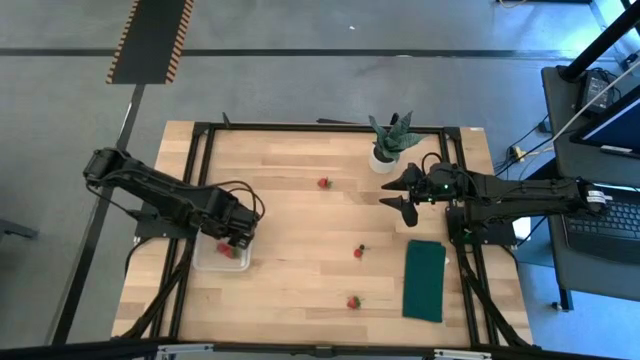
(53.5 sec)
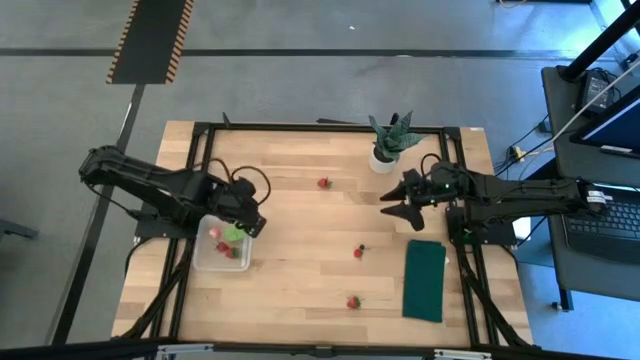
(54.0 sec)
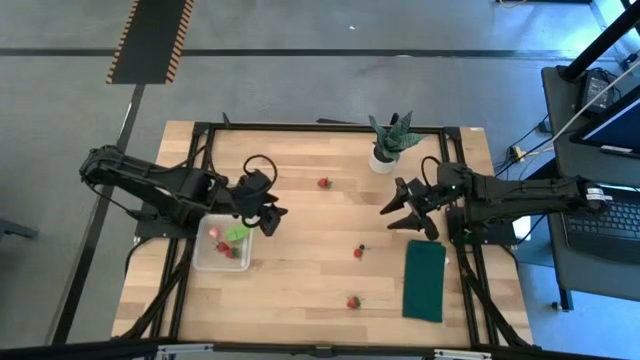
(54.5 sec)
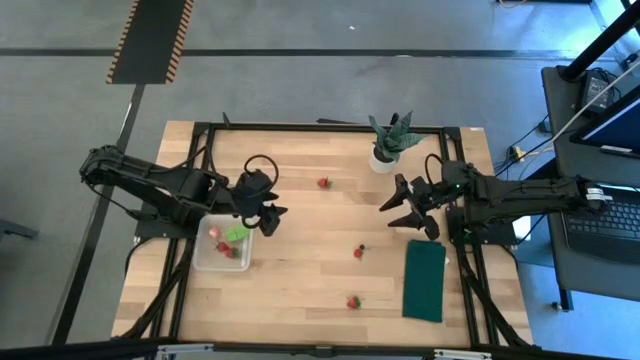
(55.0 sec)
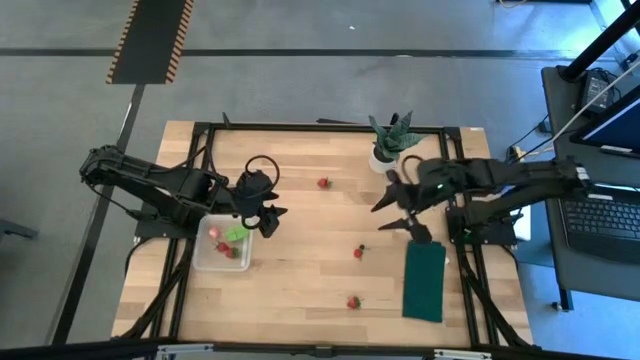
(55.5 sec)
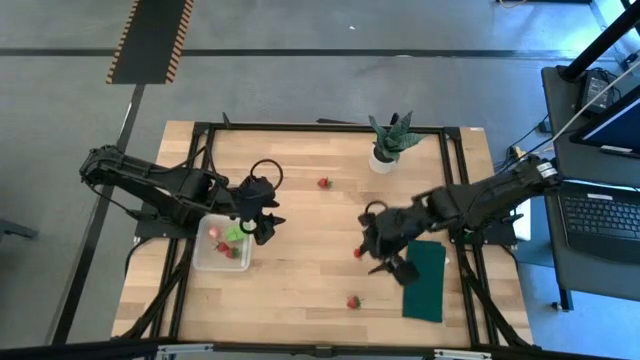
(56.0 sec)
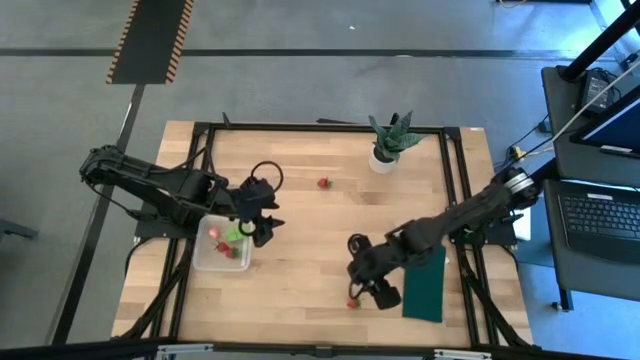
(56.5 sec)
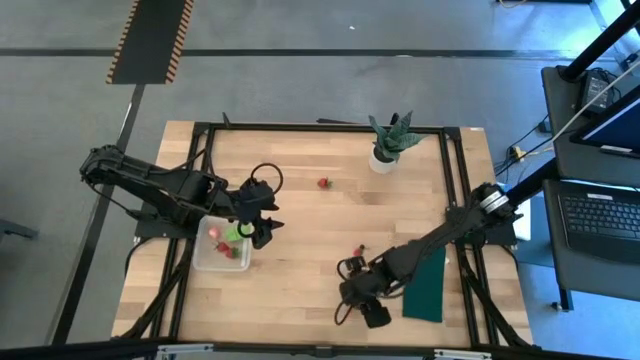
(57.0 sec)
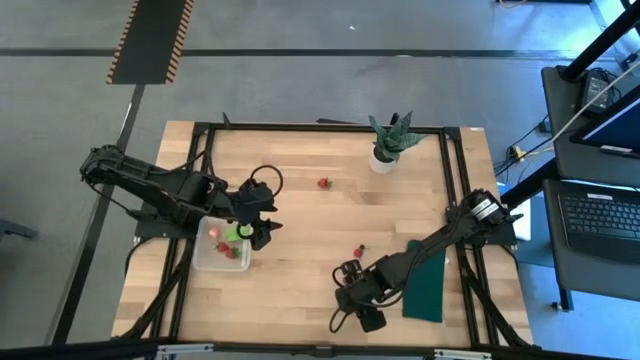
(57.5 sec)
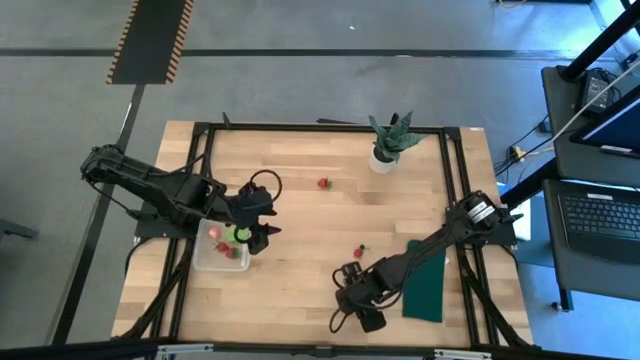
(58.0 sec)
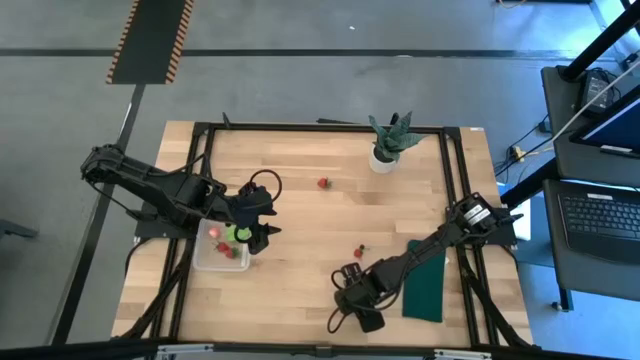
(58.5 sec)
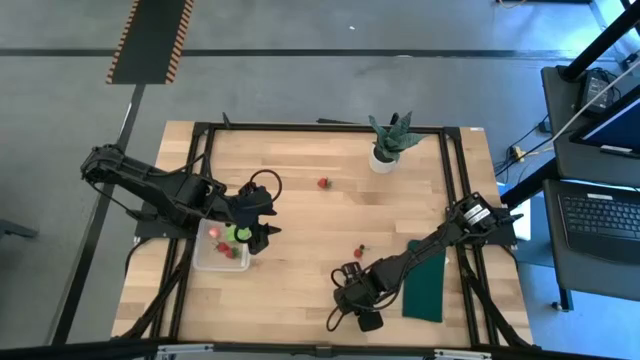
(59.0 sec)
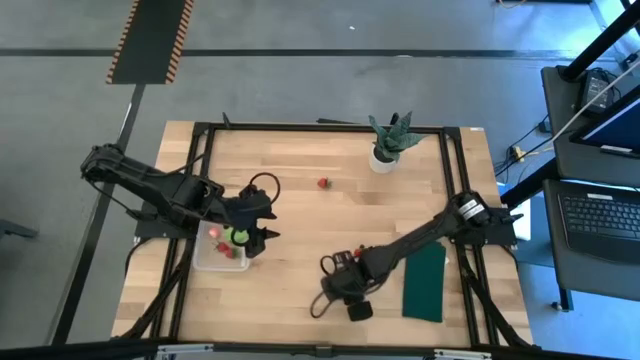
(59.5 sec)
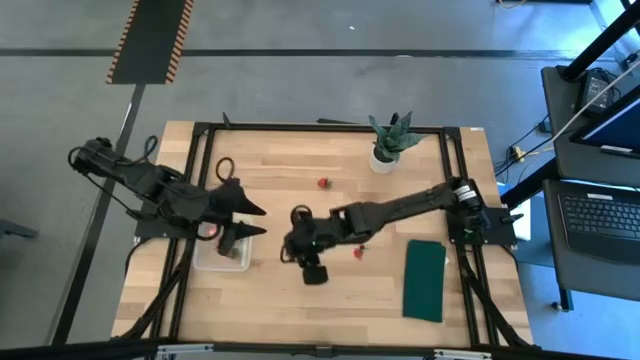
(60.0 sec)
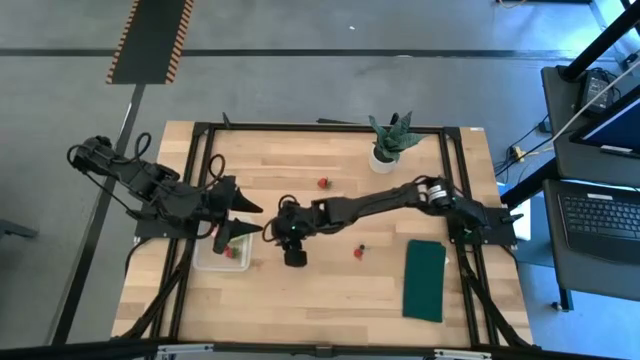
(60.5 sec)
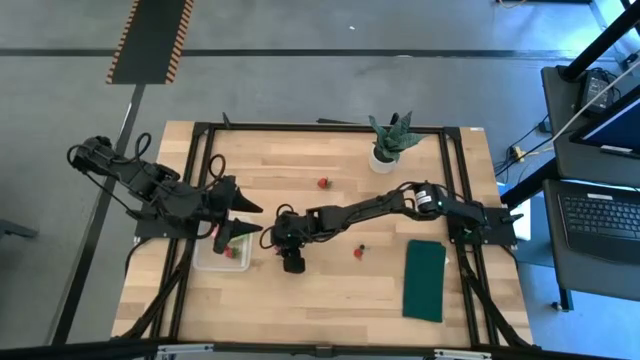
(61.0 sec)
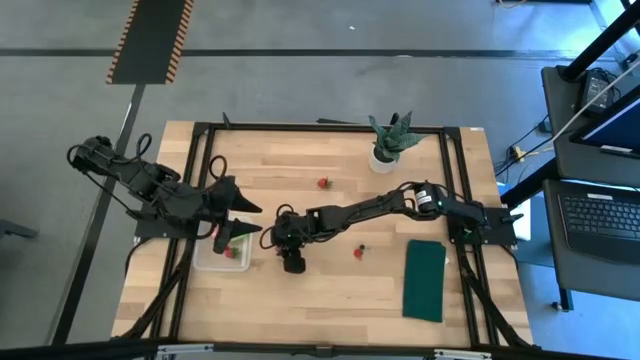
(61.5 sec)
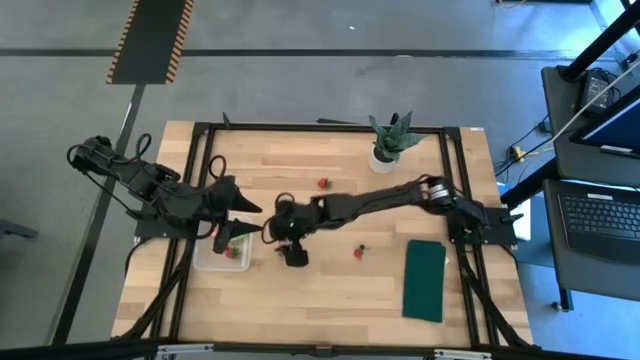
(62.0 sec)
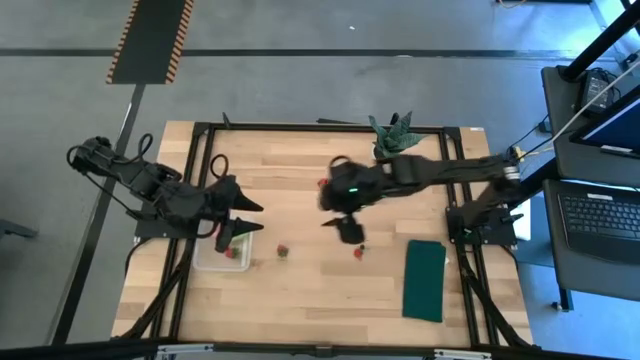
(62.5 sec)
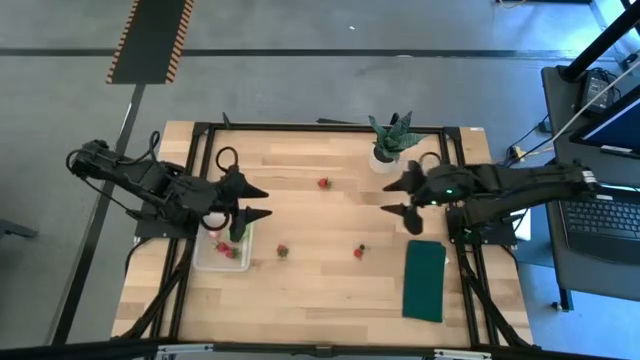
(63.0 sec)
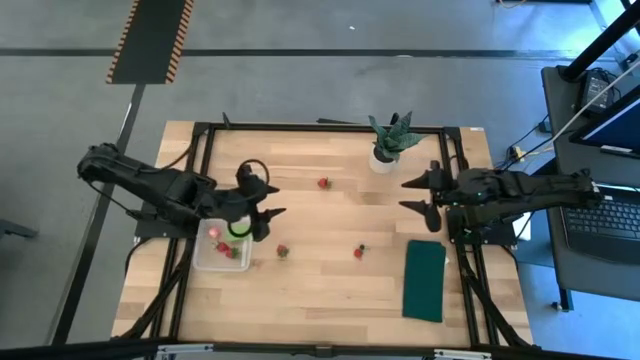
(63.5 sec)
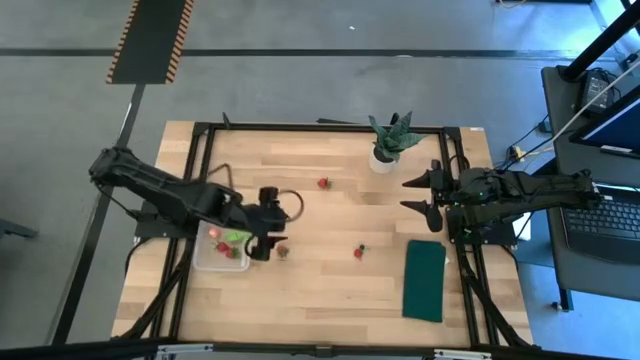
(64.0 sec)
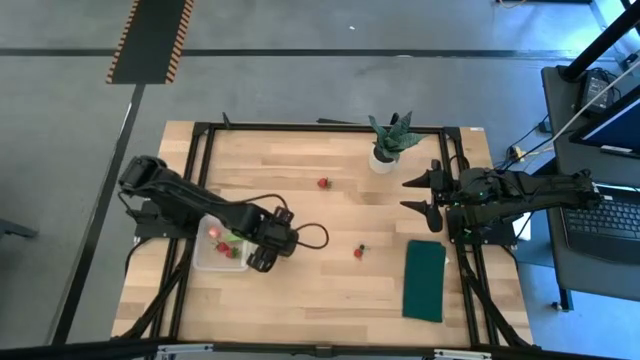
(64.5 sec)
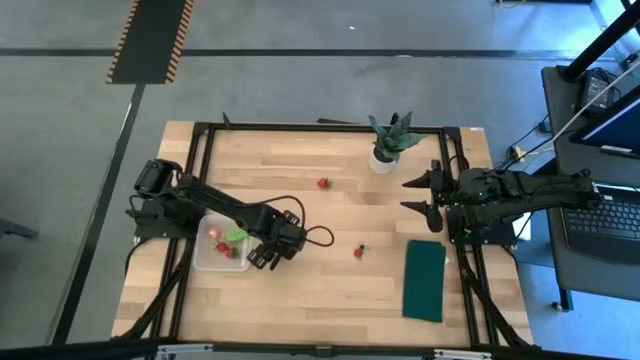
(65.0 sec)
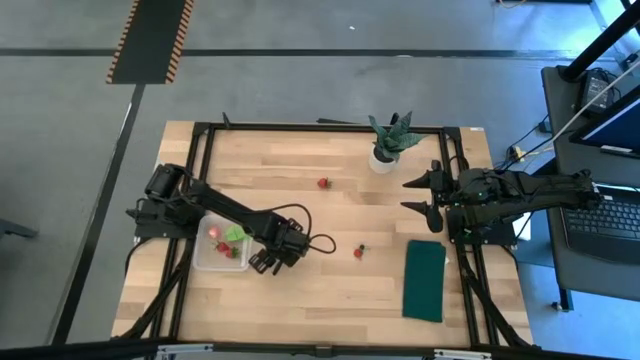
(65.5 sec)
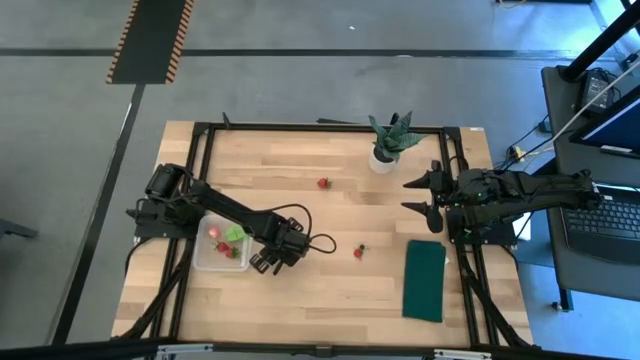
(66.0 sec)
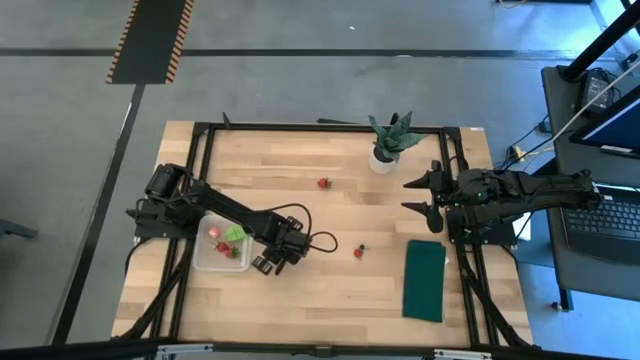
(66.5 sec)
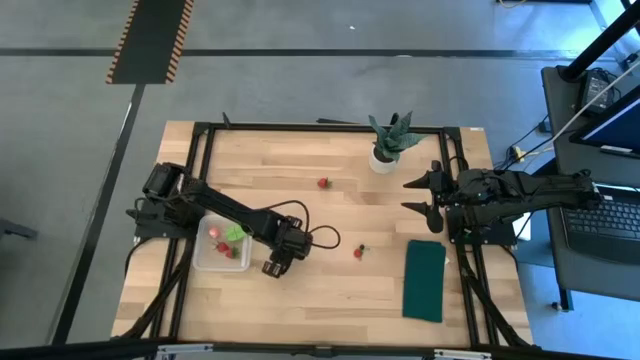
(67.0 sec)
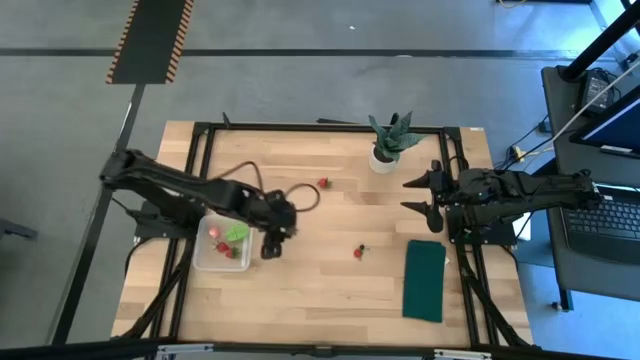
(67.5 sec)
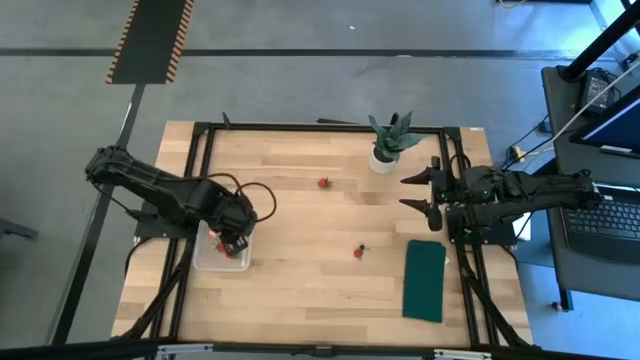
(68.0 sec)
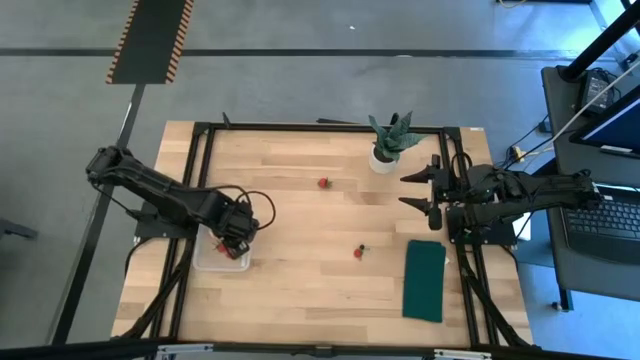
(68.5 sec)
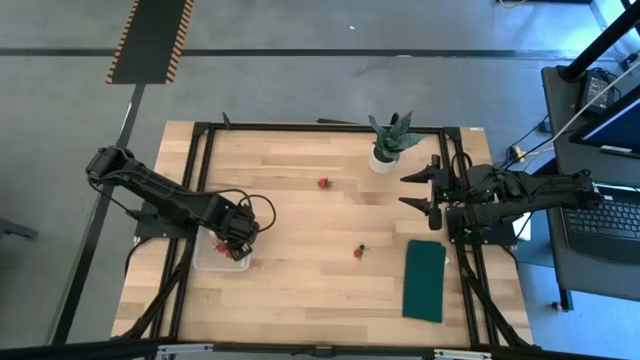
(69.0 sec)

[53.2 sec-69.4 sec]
Task: Pick and placing Produce into tupperware
Put the red strawberry into the transparent bin

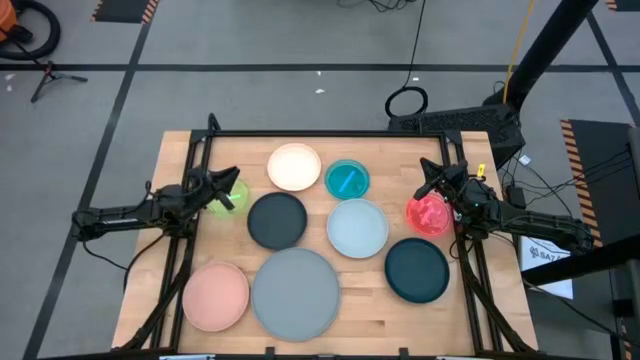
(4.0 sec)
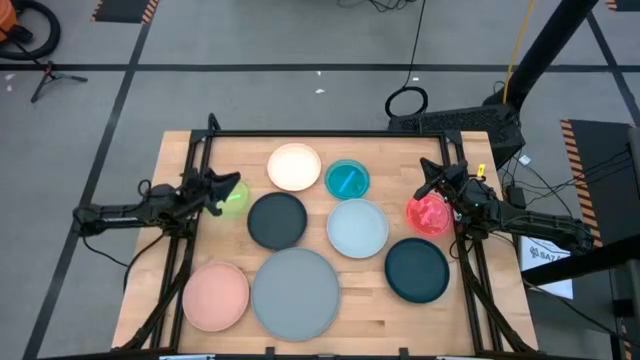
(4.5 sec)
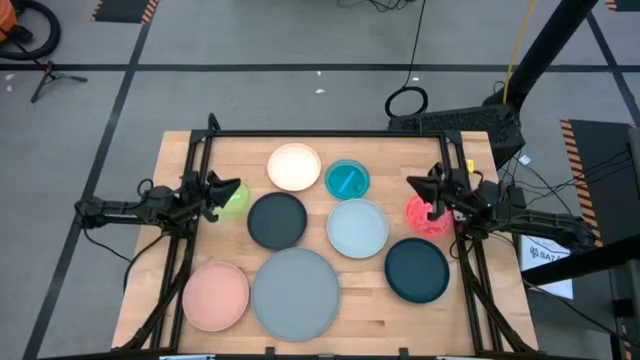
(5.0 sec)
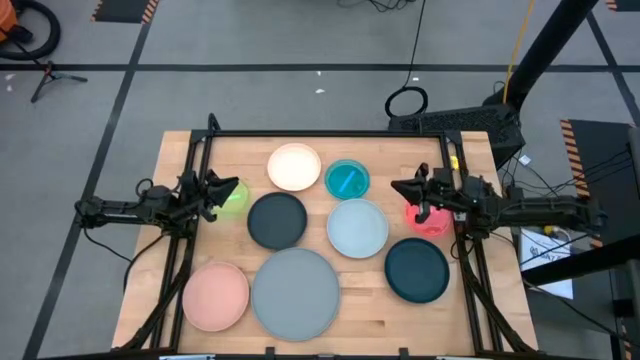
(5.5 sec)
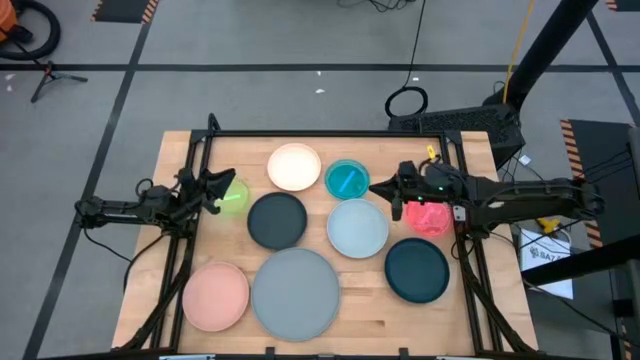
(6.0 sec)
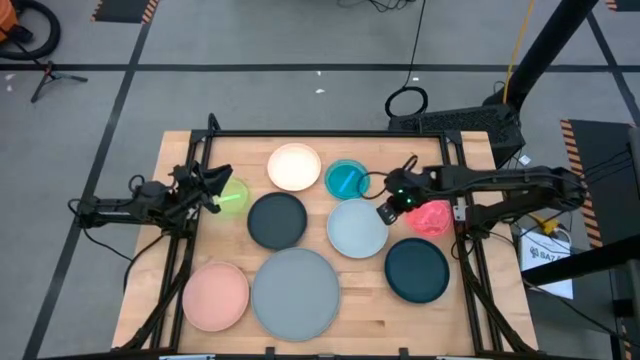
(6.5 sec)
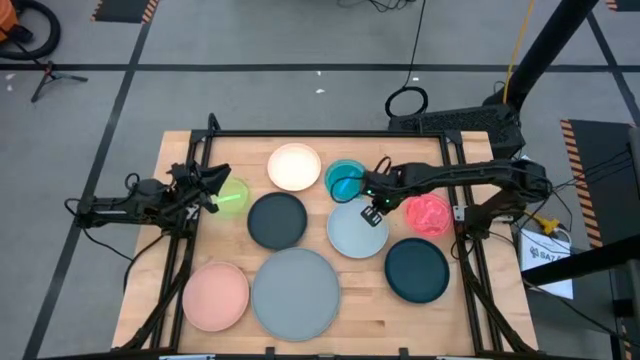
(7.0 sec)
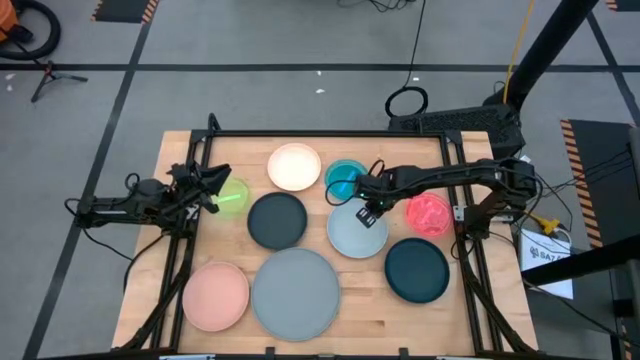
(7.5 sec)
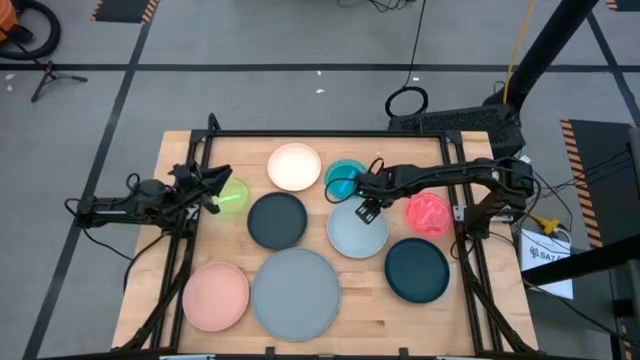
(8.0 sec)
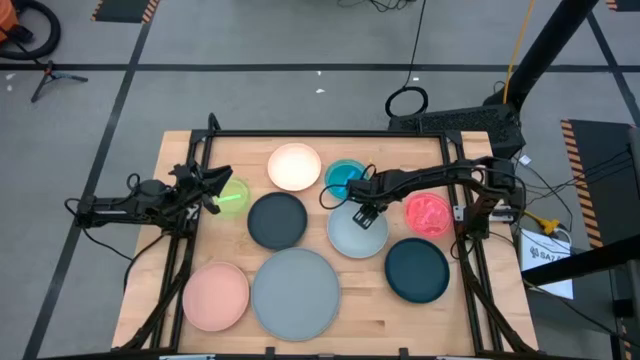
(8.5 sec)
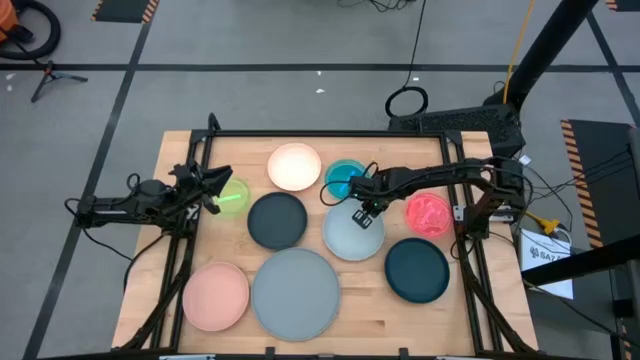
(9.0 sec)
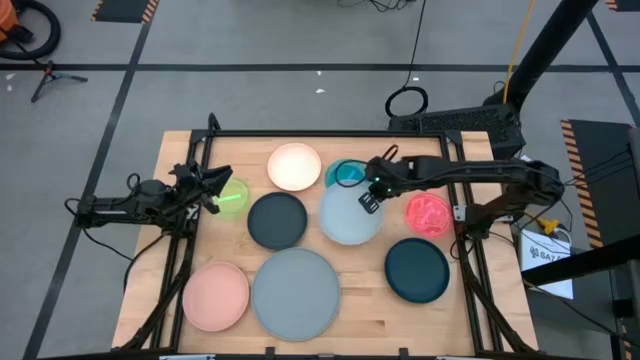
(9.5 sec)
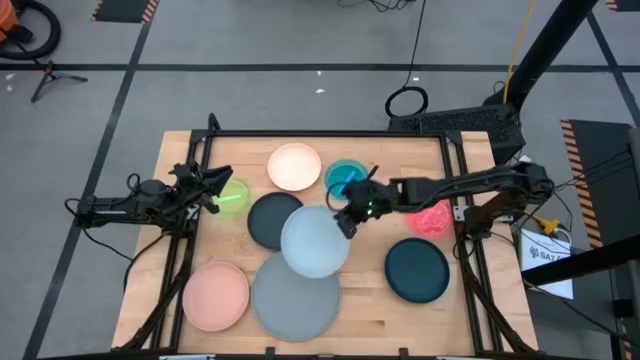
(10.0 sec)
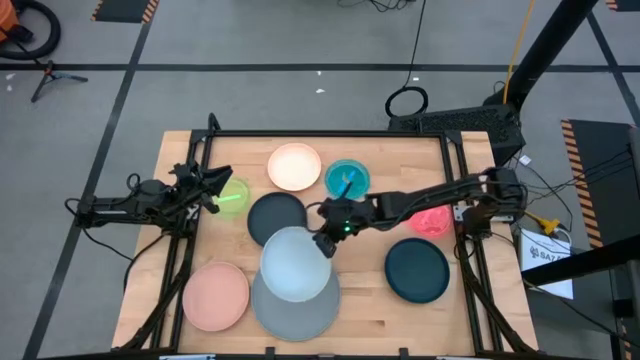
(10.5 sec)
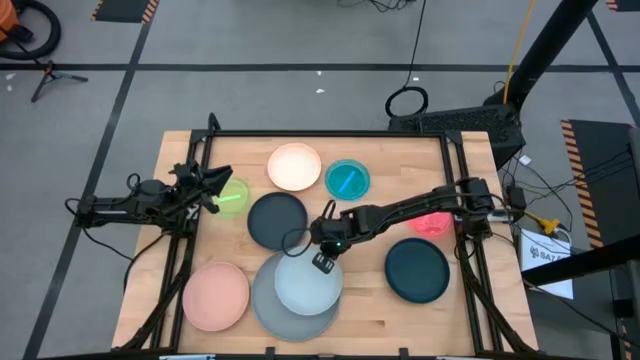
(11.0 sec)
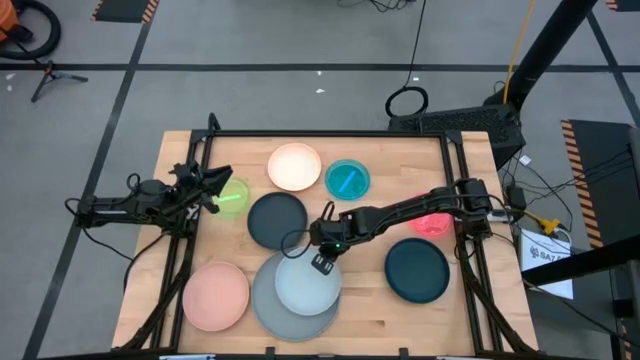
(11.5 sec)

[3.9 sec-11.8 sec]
Task: Stack plastic plates
Stack the white plate on top of the gray plate
